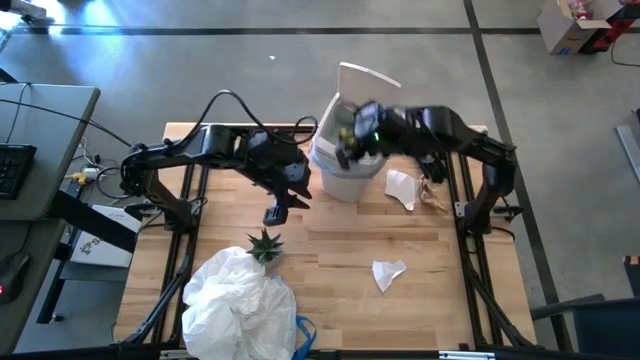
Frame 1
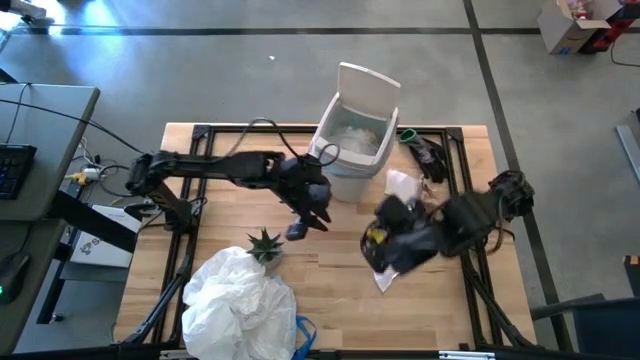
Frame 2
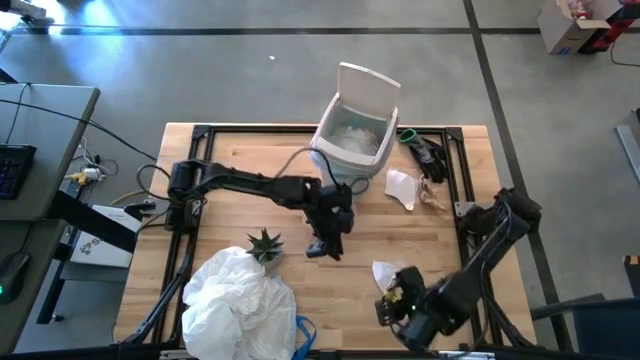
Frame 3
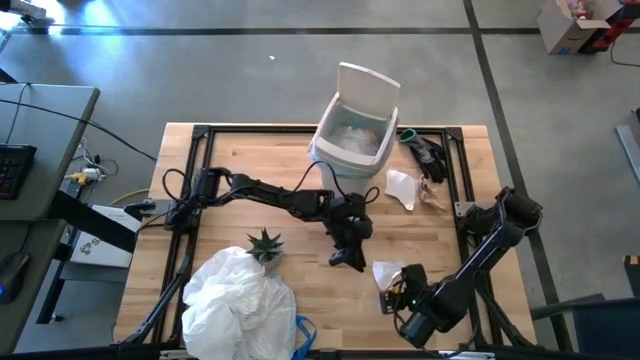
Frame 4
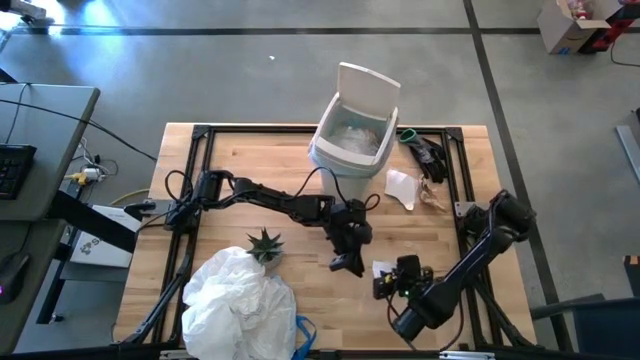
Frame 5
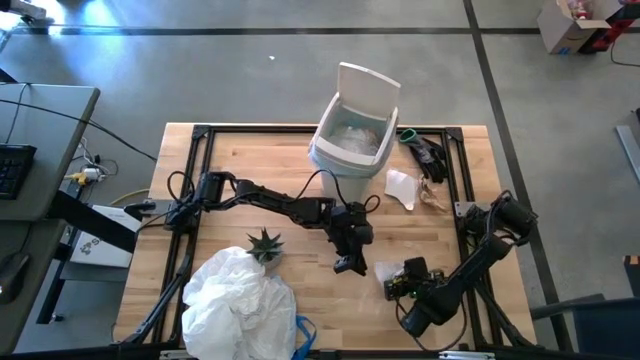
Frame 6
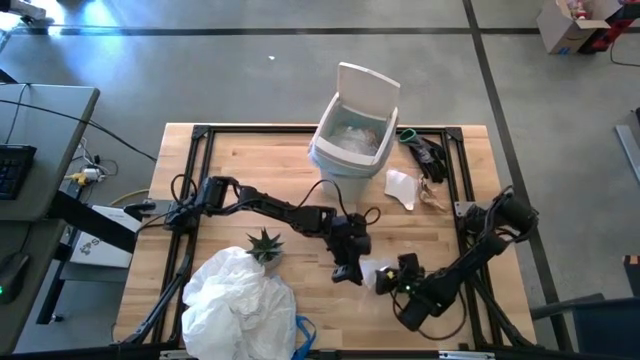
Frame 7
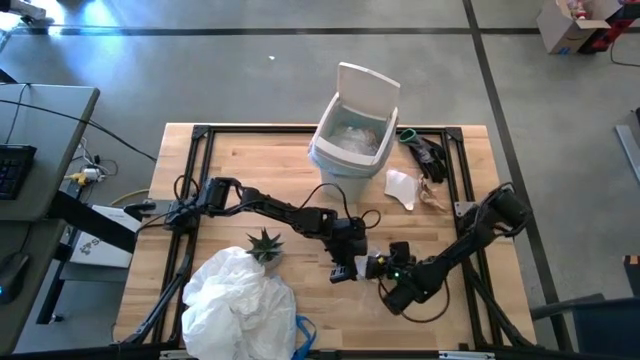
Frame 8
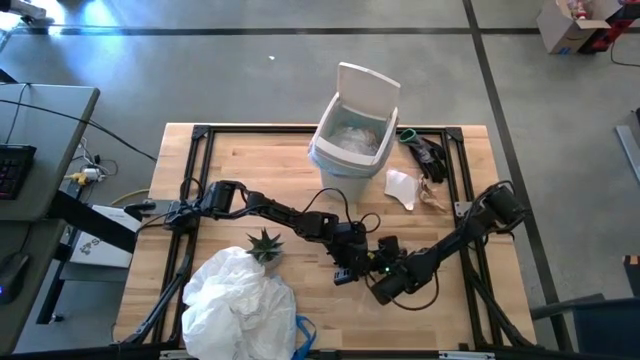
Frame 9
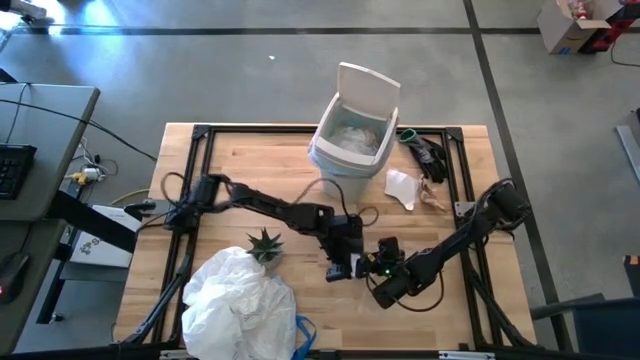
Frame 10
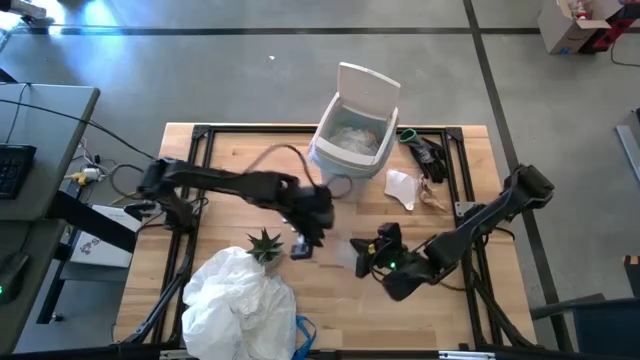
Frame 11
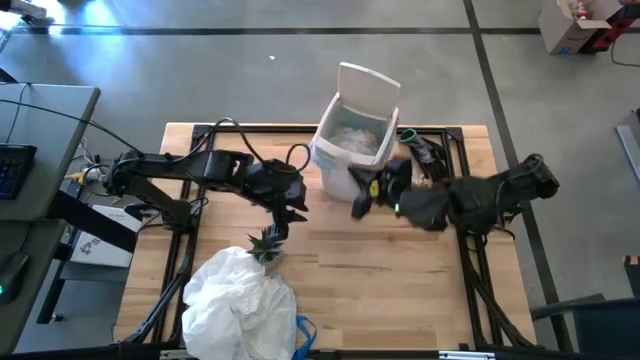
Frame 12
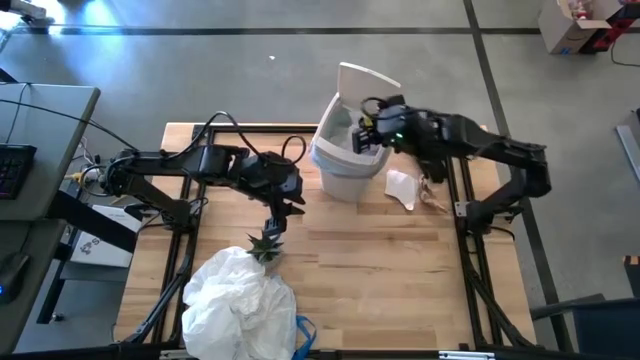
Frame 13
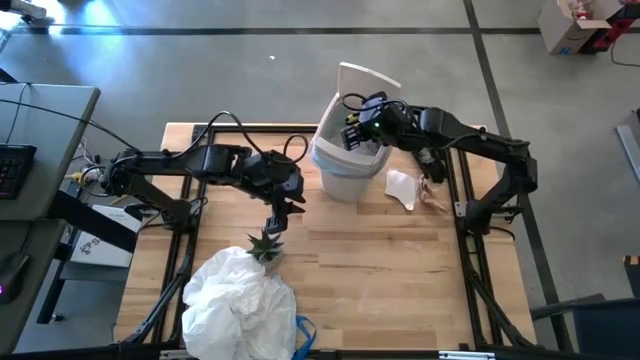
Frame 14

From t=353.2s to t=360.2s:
Task: place trash/remove bag and relplace
Put the white paper into the trash bin

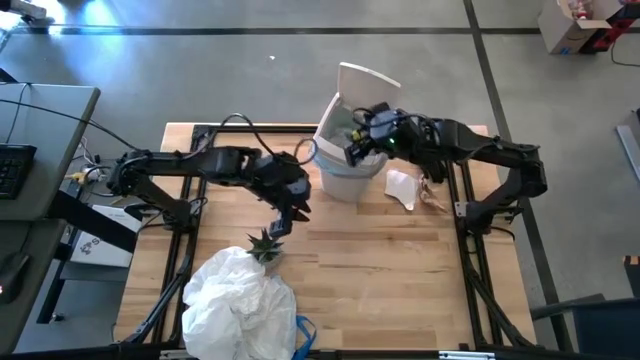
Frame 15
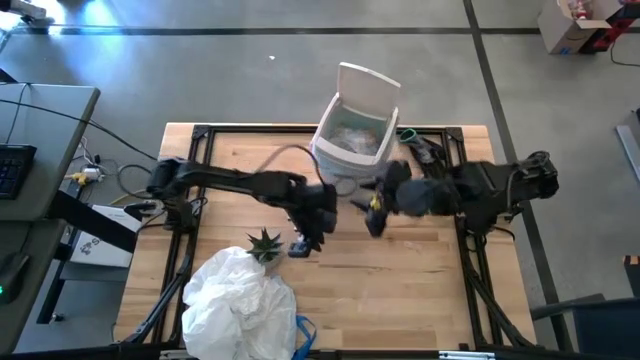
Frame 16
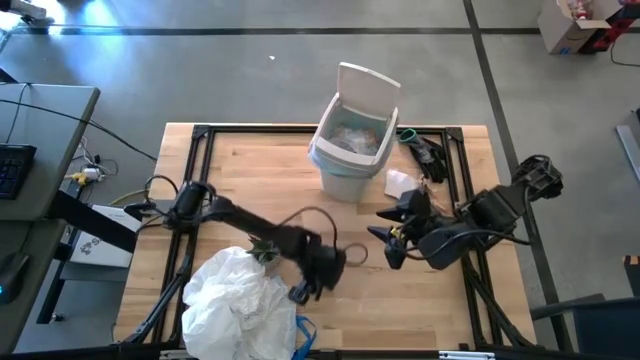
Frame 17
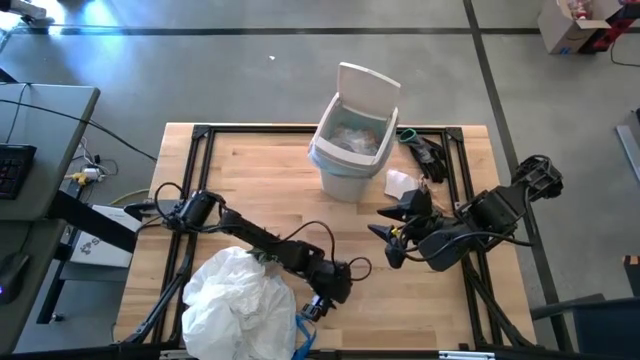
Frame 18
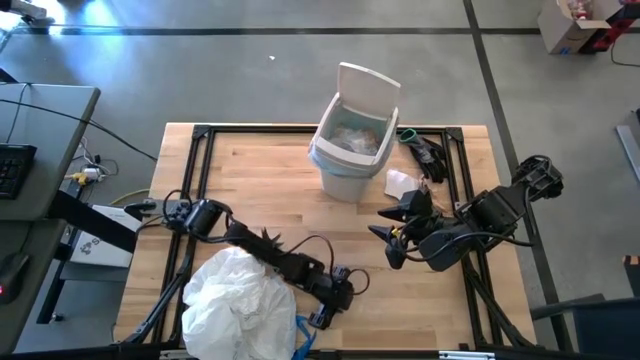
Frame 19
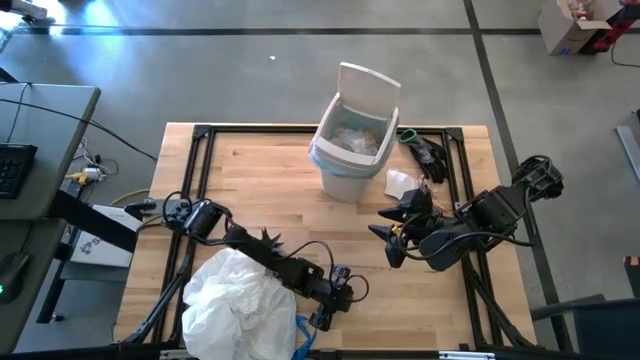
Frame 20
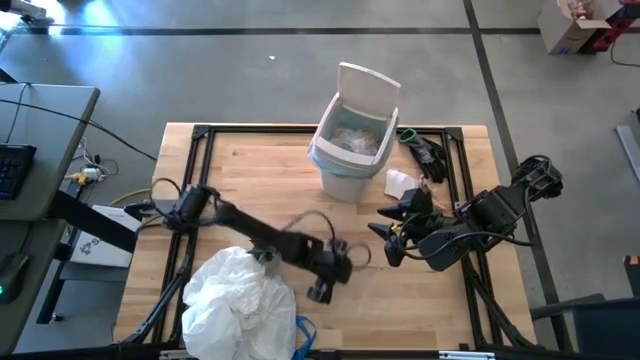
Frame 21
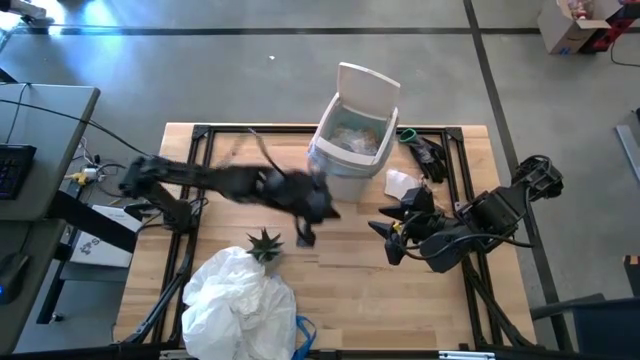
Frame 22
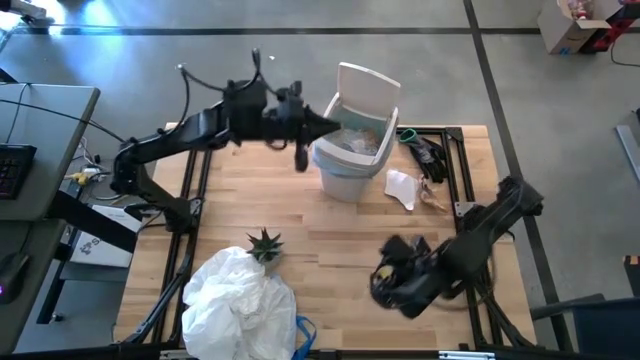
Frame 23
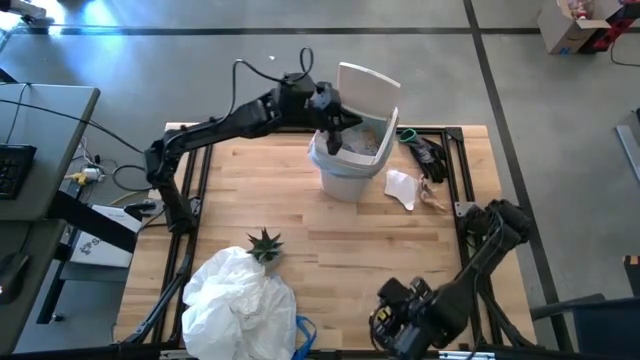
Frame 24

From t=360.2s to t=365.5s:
Put the transparent plastic into the trash bin

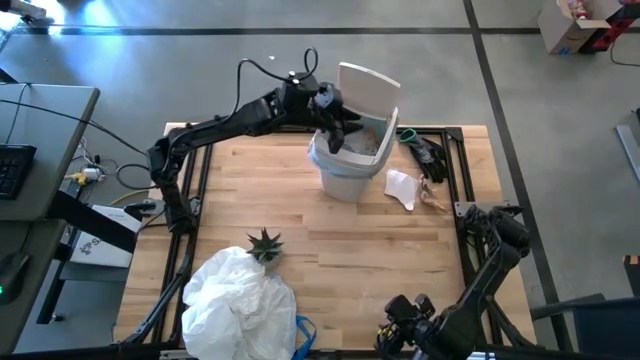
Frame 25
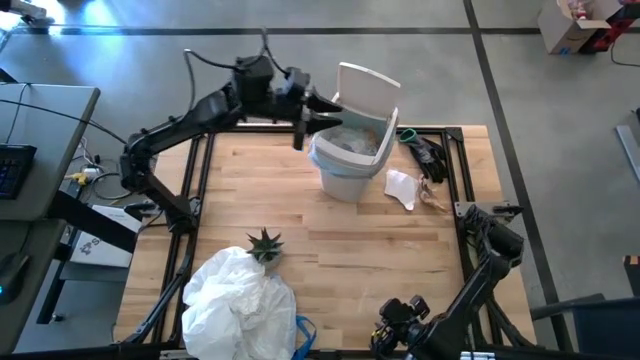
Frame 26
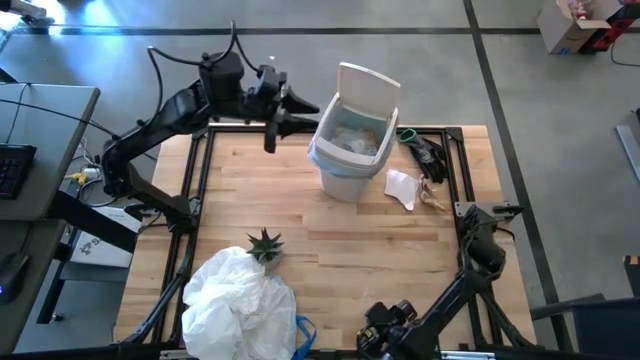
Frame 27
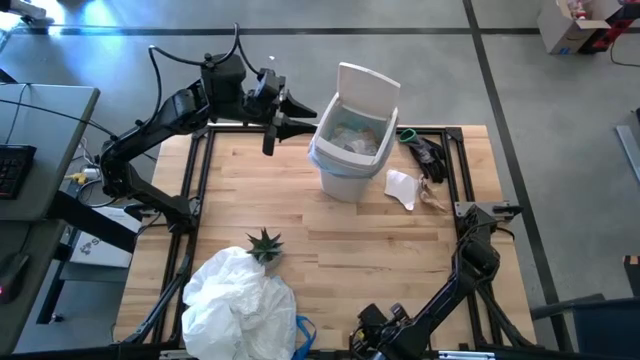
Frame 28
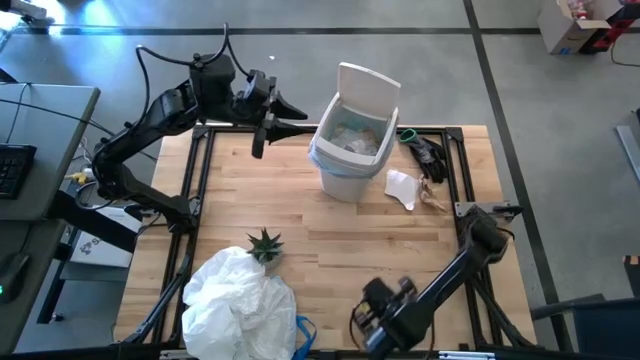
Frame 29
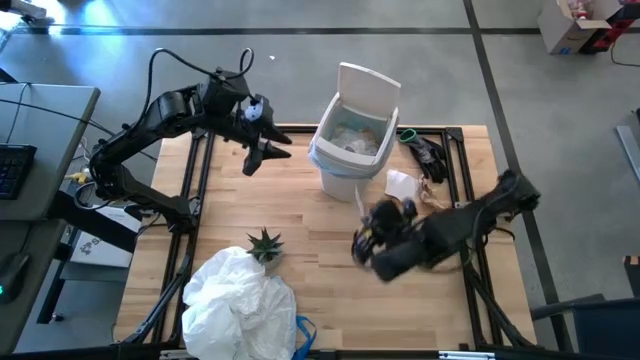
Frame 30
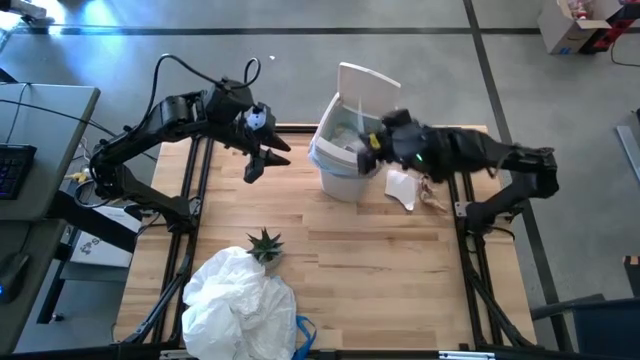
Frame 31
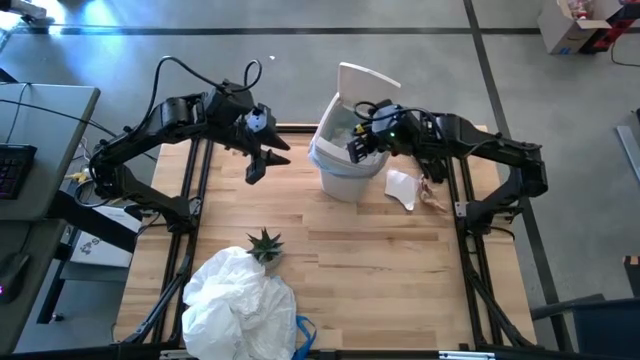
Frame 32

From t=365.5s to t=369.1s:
Put the transparent plastic into the trash bin

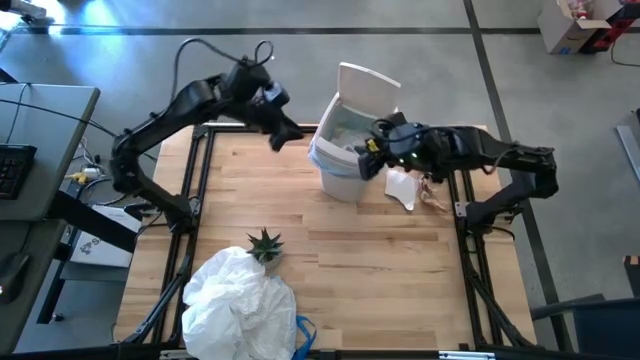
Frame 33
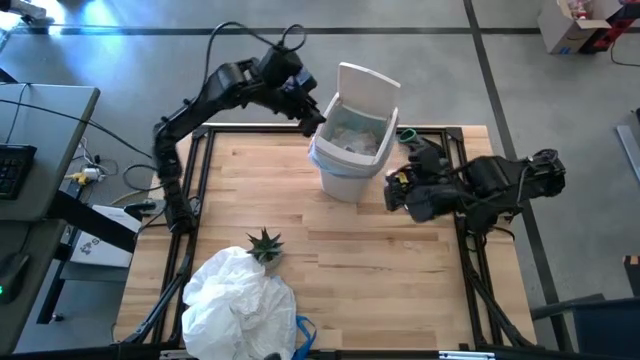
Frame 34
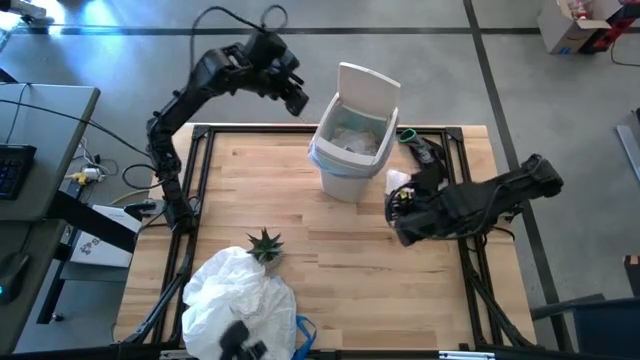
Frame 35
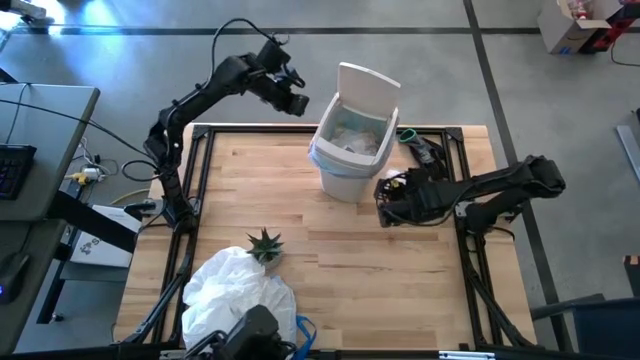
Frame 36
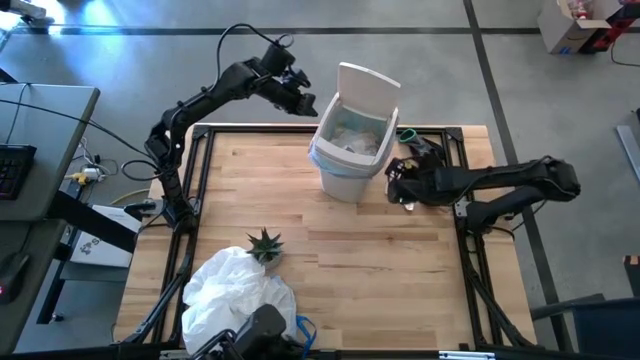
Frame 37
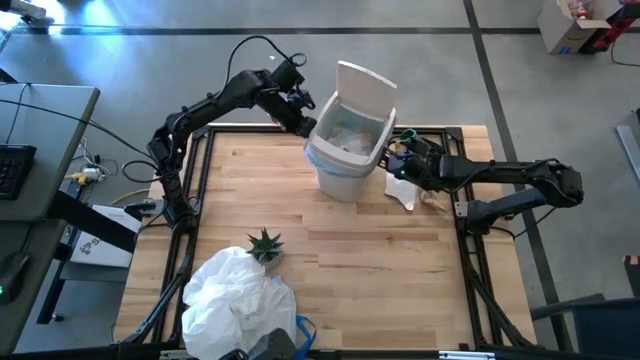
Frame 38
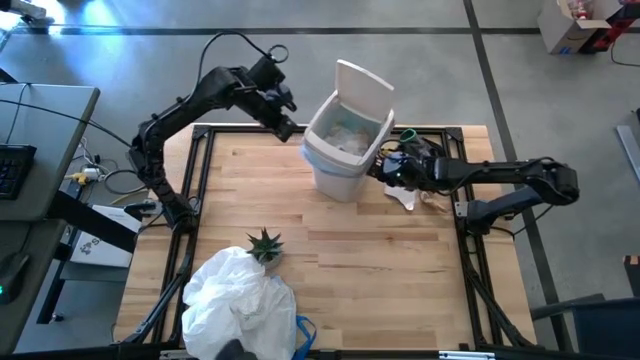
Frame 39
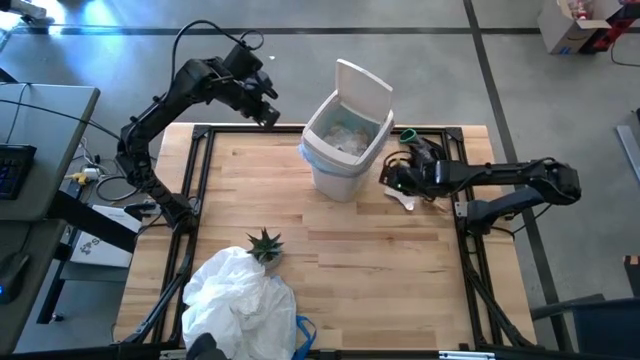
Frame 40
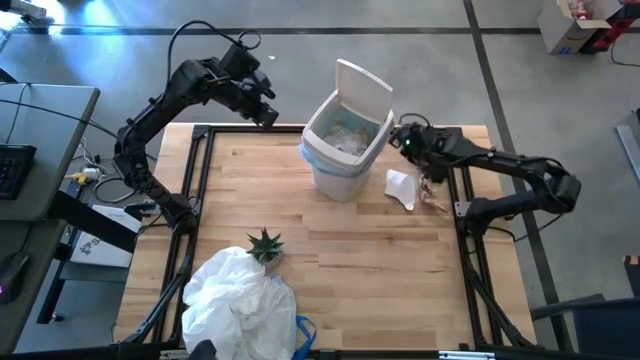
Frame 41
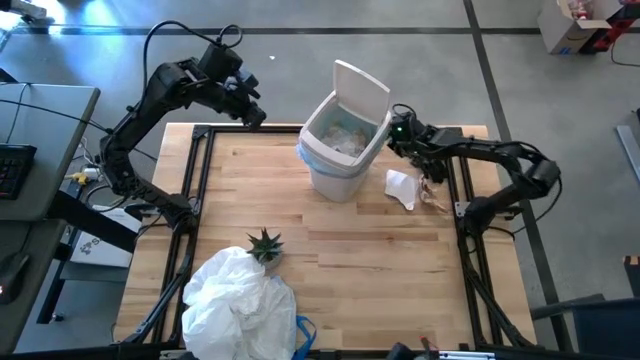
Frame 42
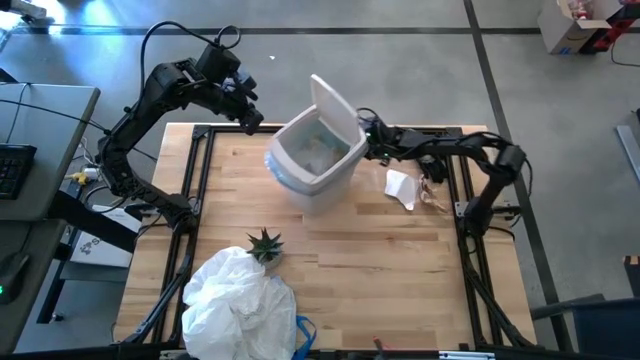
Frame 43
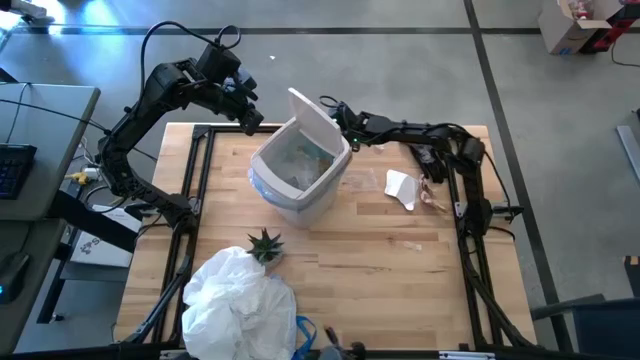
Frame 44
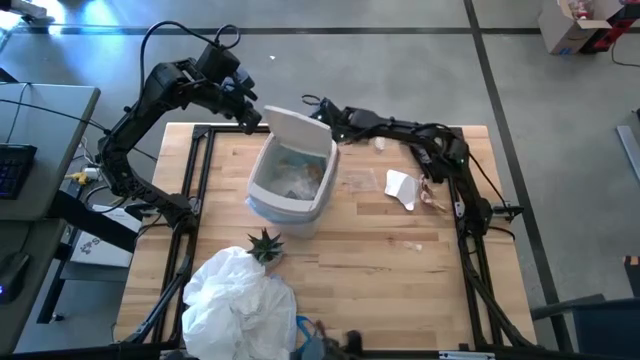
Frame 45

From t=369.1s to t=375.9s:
Adjust the trash bin
